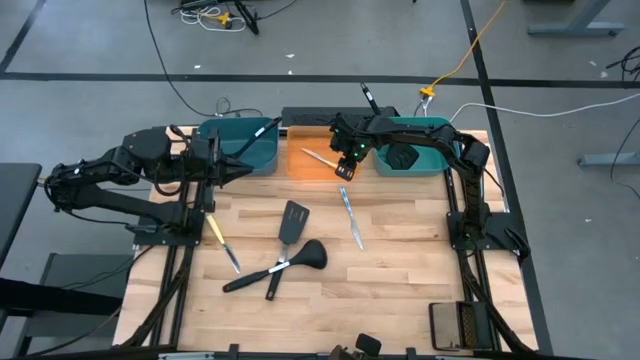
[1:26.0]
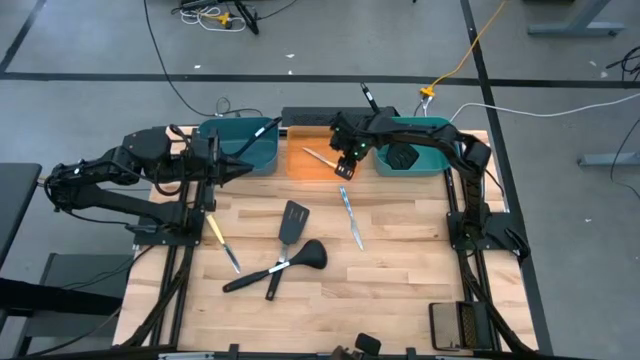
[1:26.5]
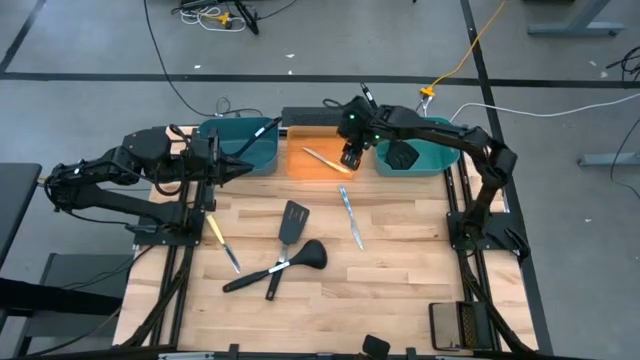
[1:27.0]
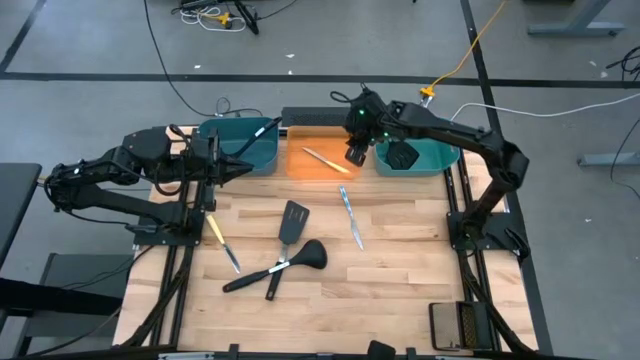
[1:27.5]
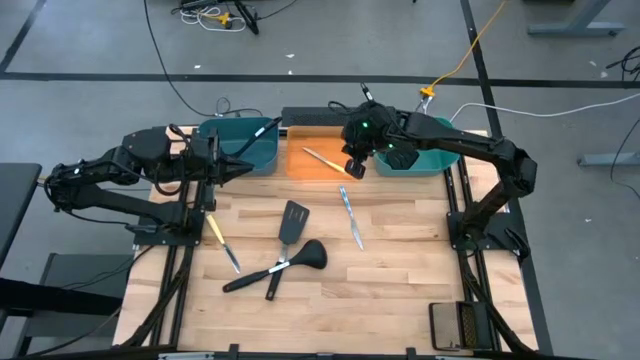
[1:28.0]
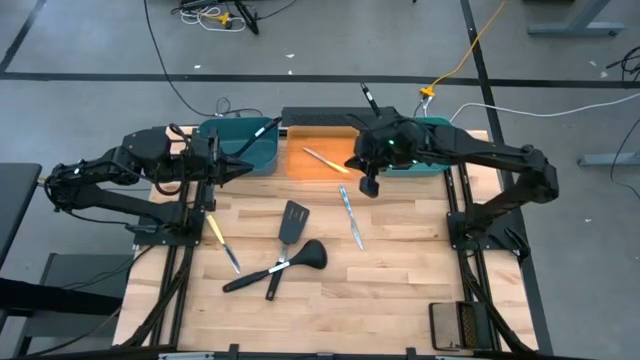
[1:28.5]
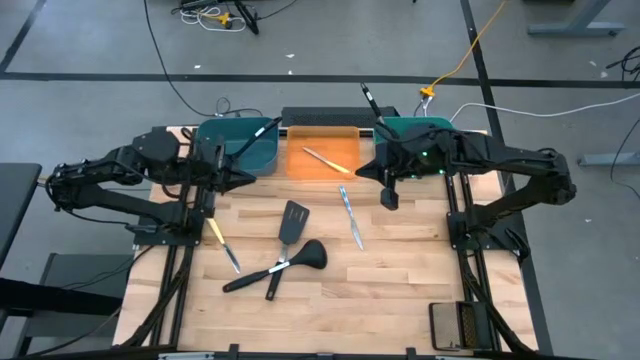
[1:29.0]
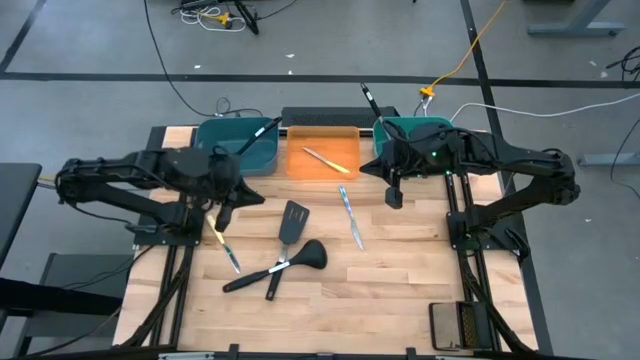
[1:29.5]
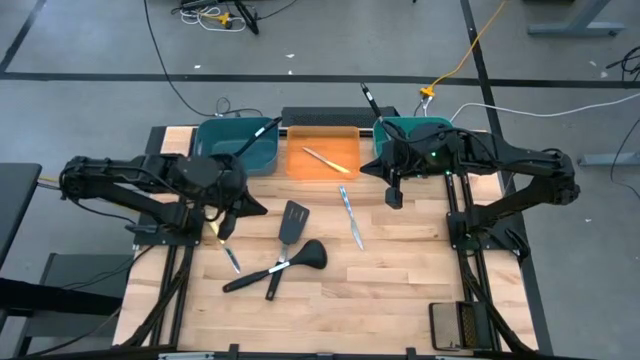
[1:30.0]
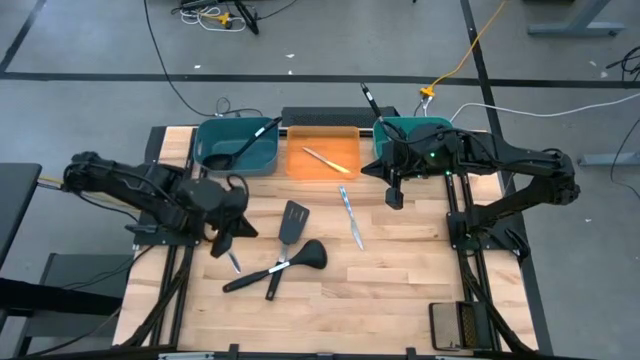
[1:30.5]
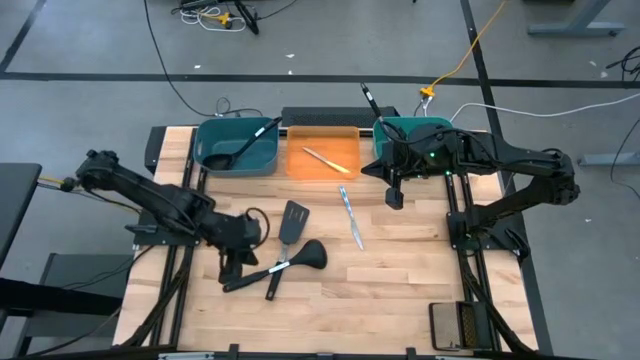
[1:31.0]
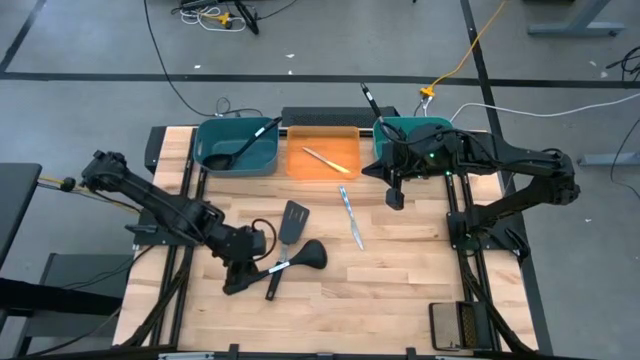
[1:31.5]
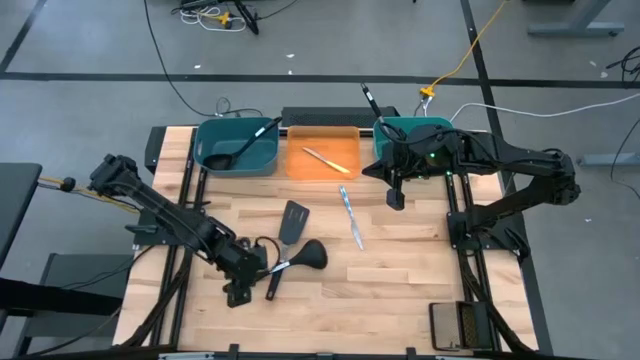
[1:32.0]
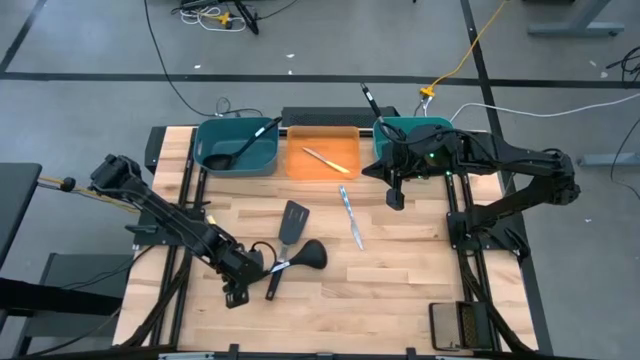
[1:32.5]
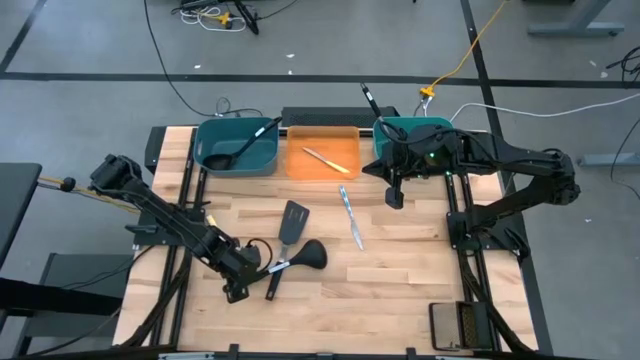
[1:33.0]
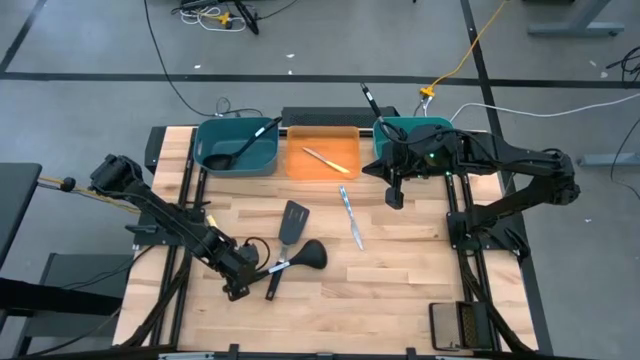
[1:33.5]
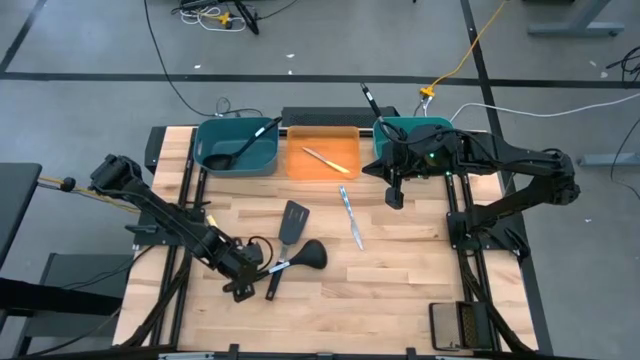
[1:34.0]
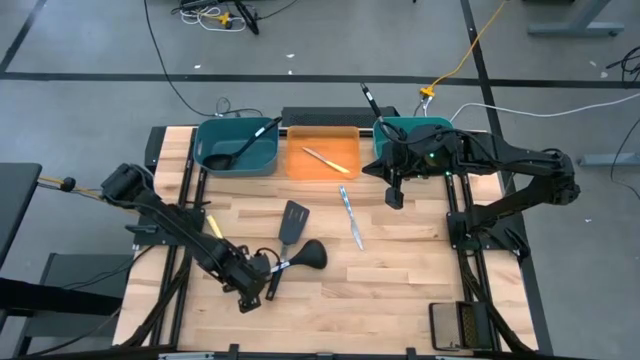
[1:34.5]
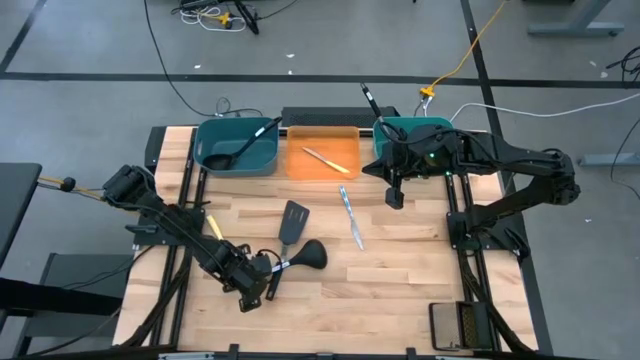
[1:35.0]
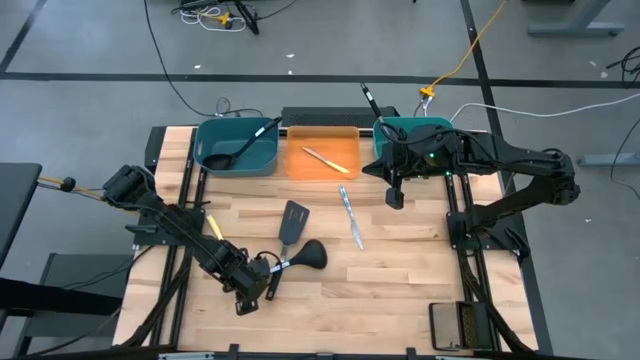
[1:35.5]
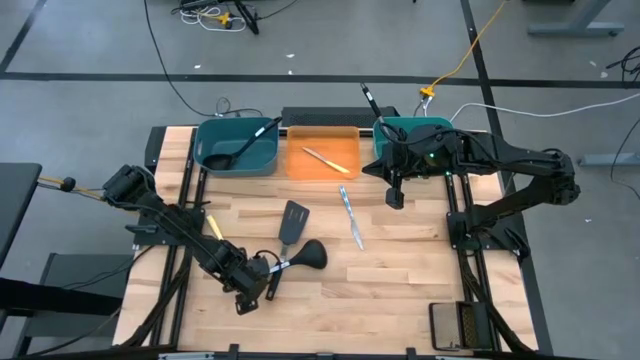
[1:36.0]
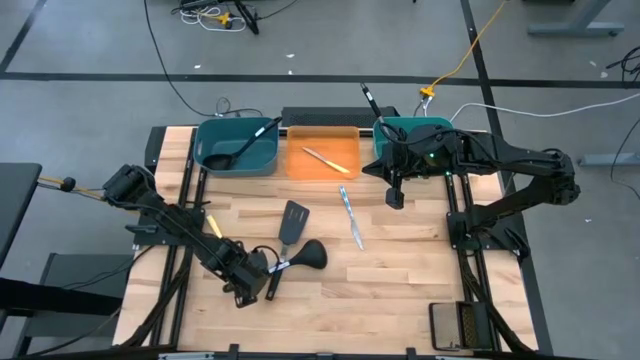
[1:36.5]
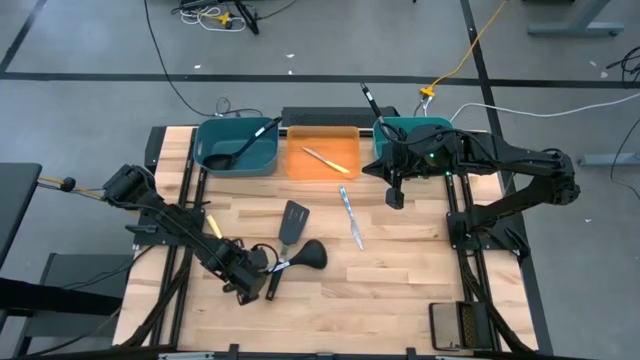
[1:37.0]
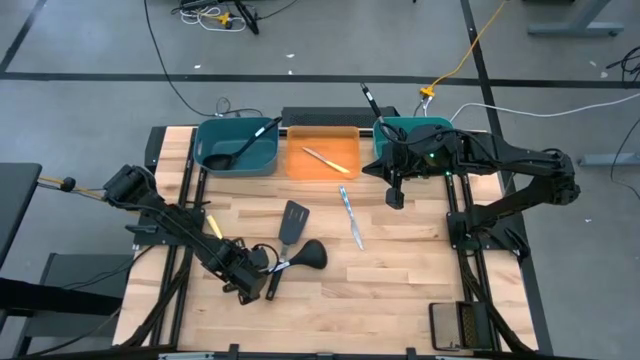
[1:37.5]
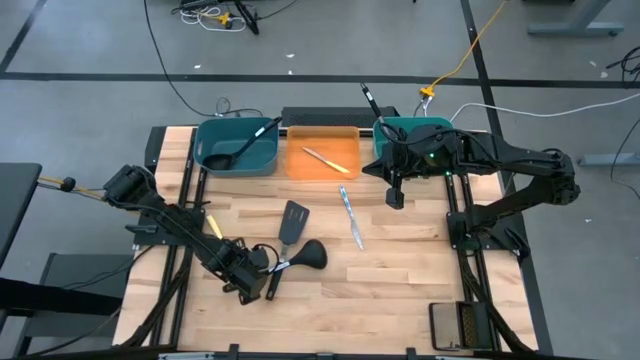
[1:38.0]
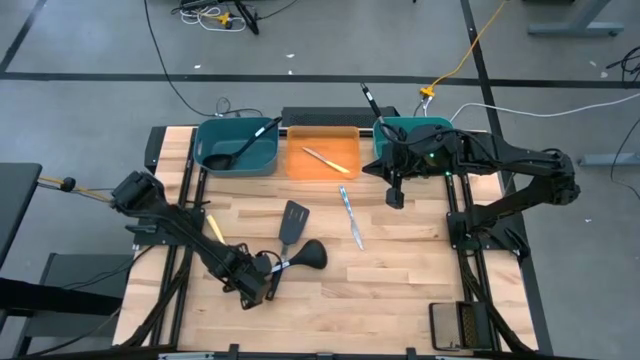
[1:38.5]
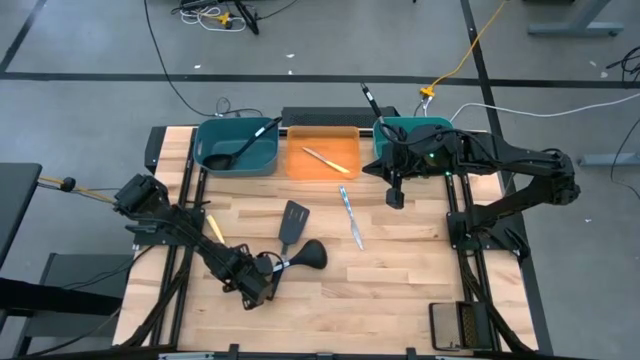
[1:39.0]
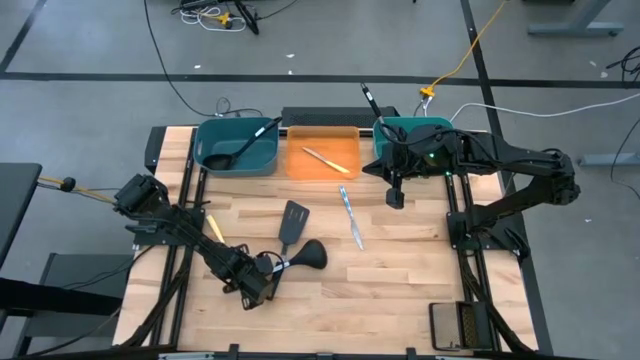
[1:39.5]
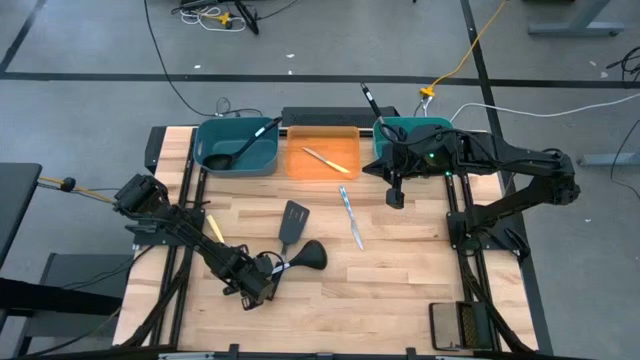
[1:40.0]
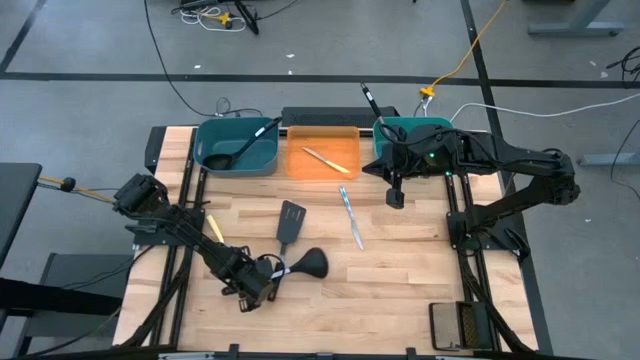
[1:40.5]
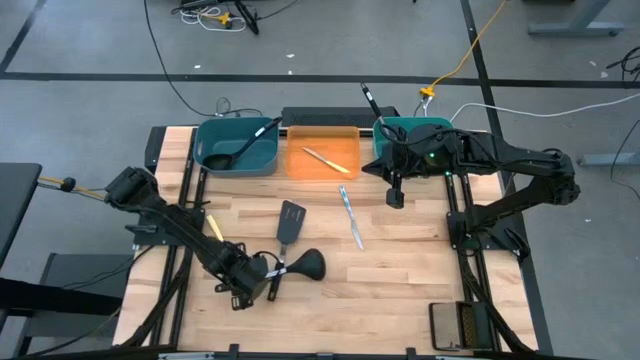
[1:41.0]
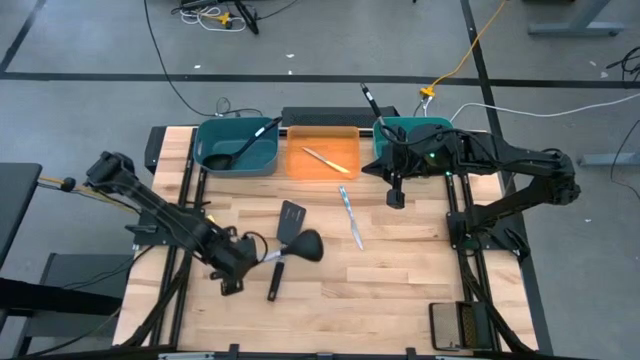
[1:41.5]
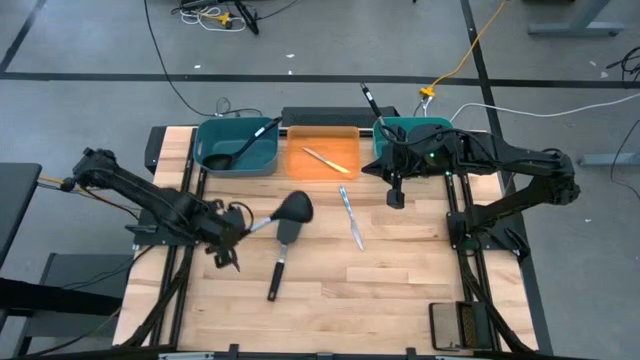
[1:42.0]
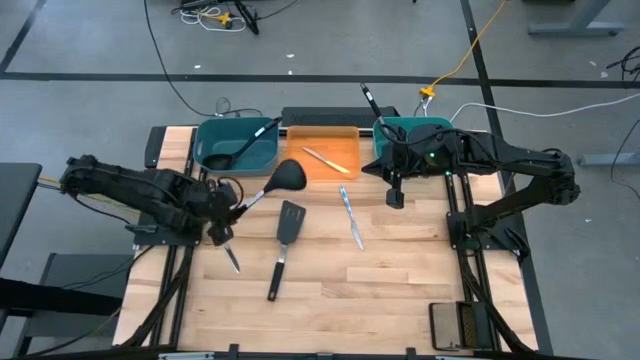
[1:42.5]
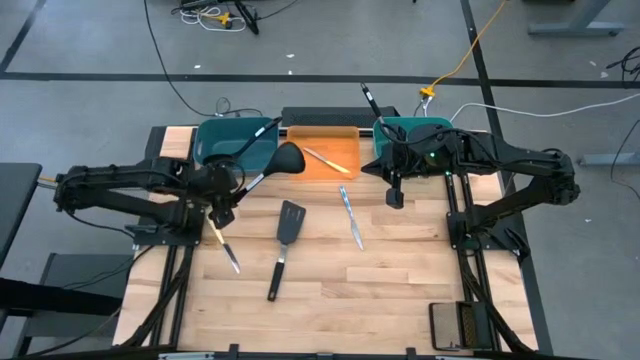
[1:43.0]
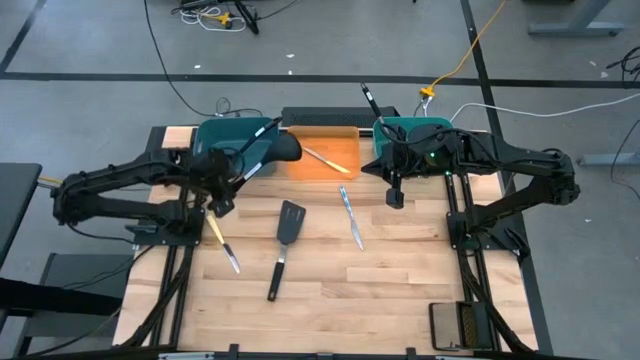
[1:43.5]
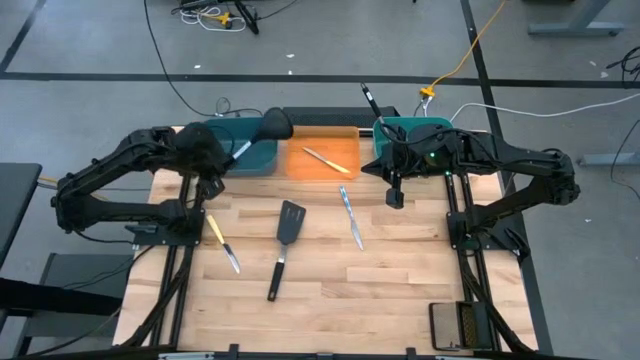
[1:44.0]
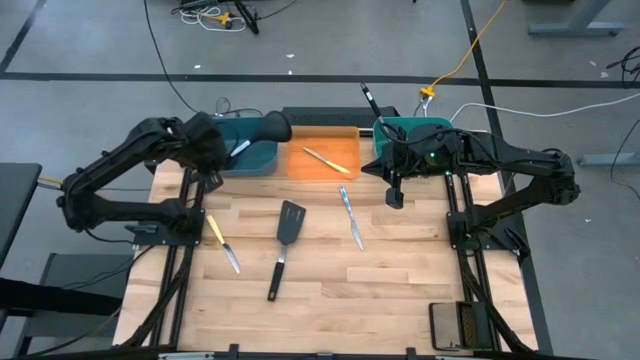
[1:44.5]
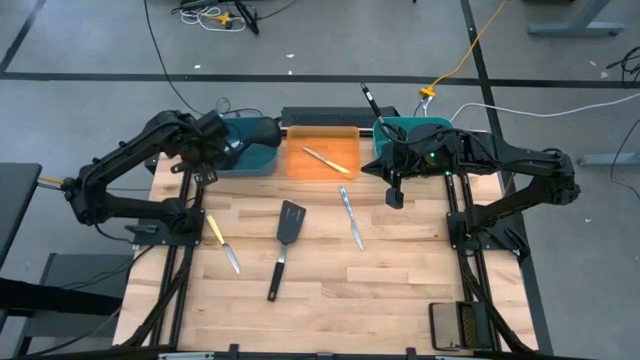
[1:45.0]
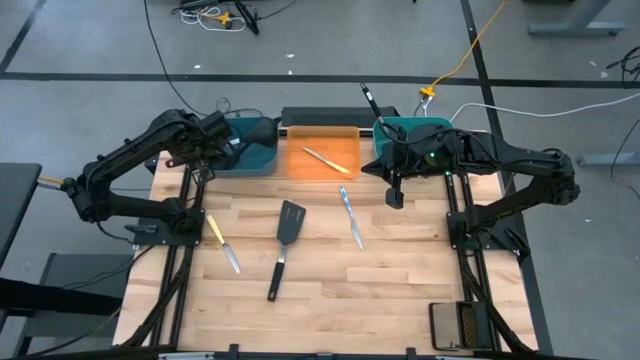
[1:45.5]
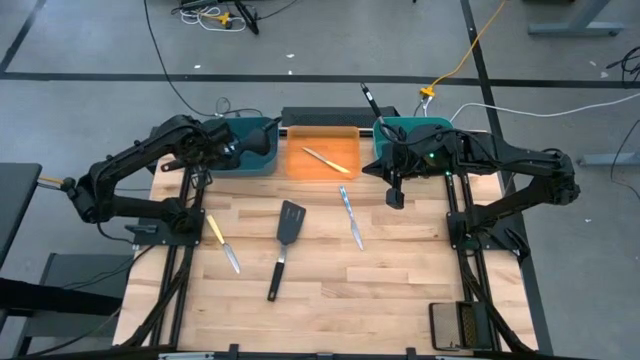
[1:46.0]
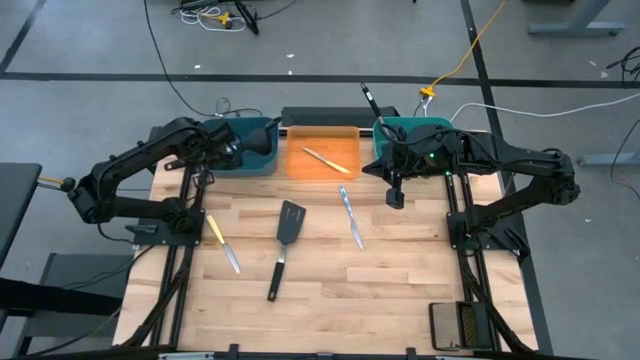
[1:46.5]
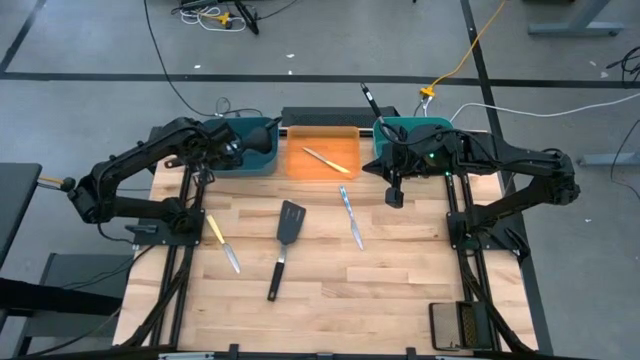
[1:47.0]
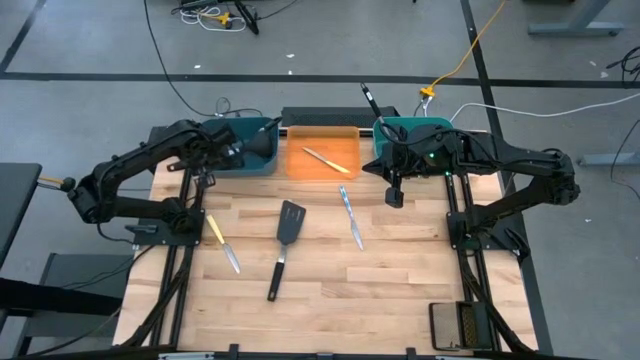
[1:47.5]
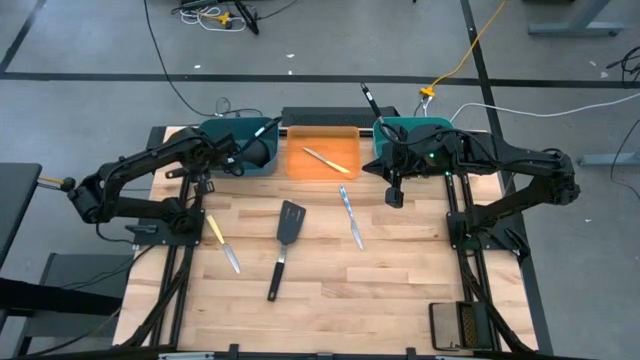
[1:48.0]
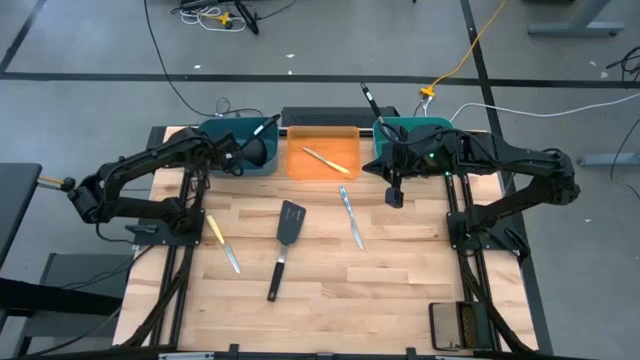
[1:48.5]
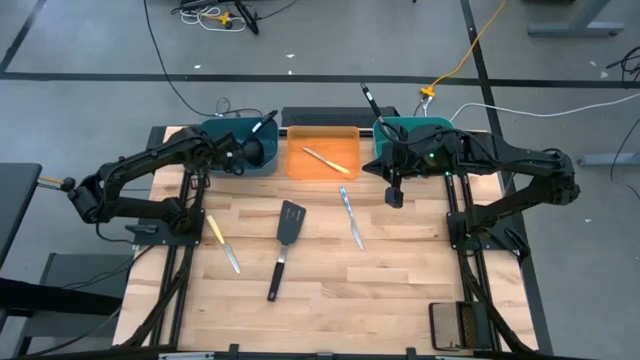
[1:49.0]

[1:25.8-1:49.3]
Task: Pick & Place Kitchen Items
Put the black ladle into the blue bin
